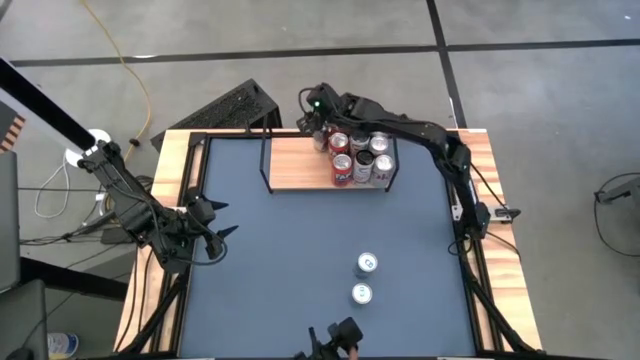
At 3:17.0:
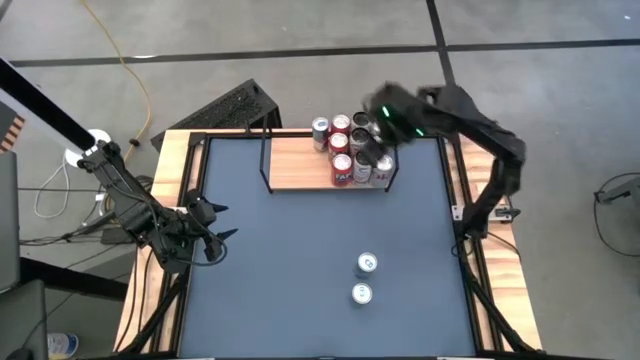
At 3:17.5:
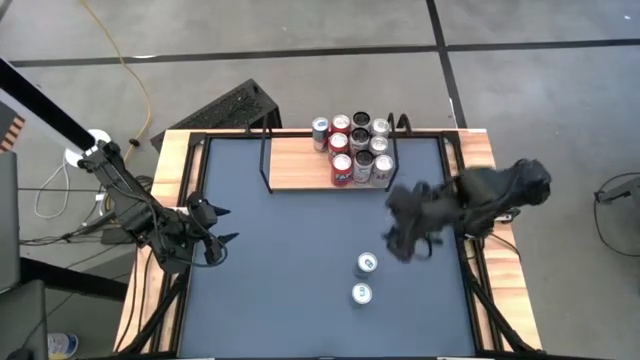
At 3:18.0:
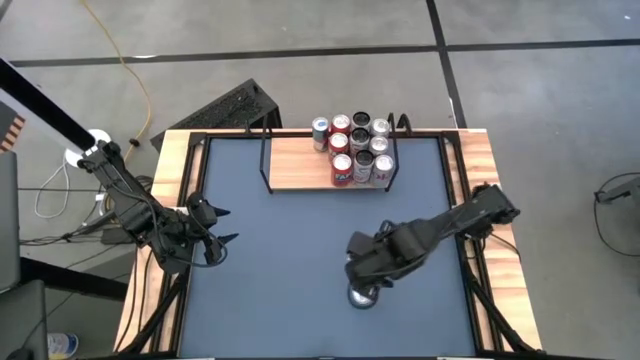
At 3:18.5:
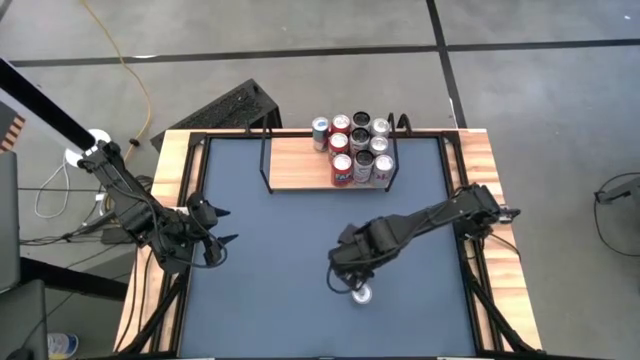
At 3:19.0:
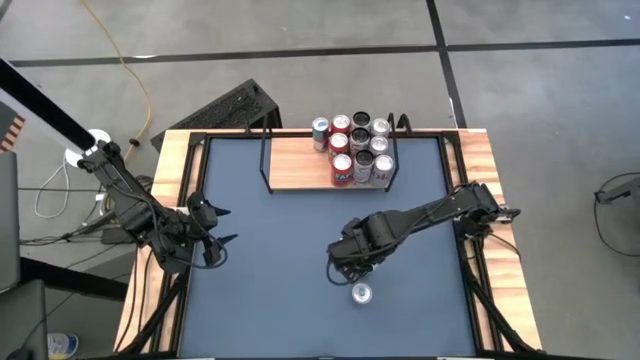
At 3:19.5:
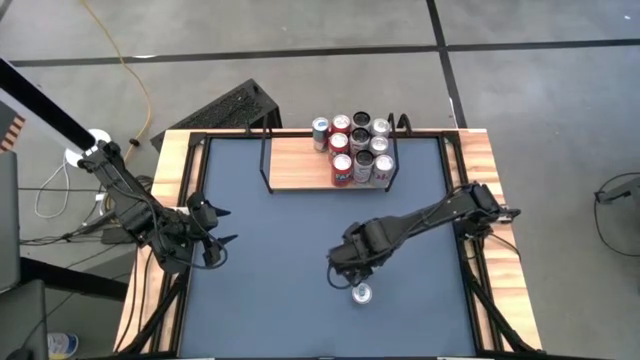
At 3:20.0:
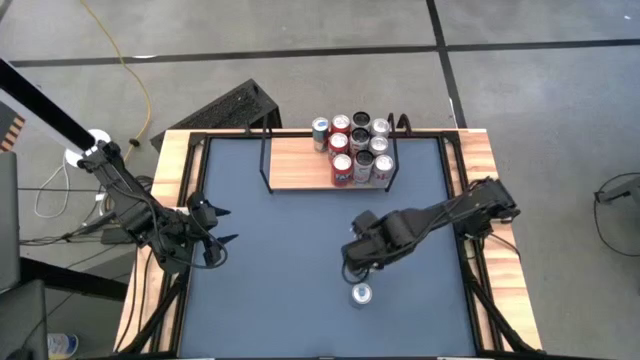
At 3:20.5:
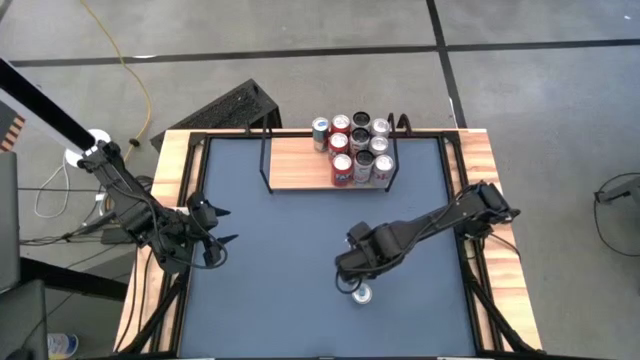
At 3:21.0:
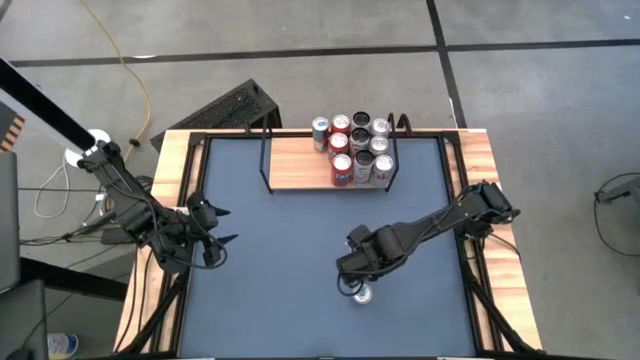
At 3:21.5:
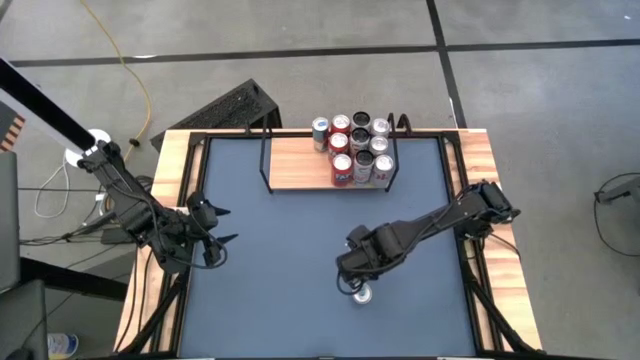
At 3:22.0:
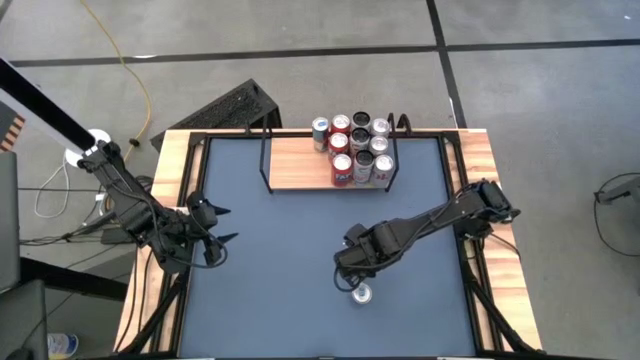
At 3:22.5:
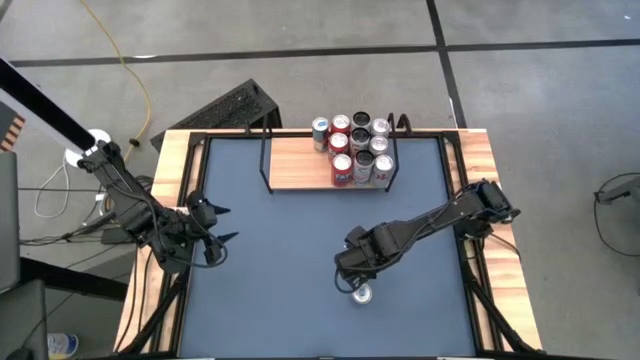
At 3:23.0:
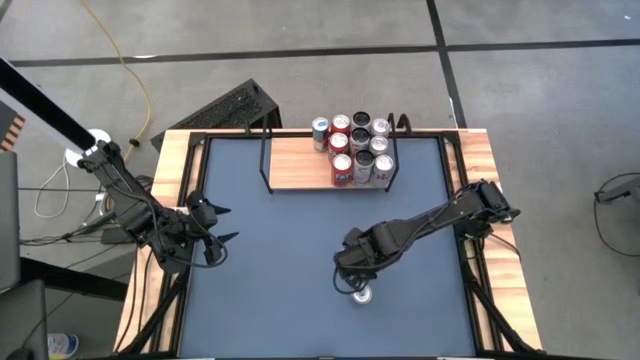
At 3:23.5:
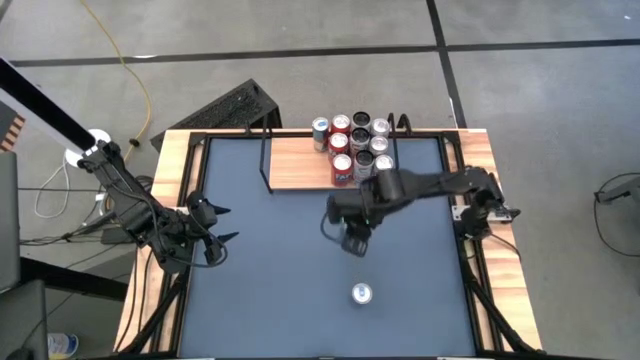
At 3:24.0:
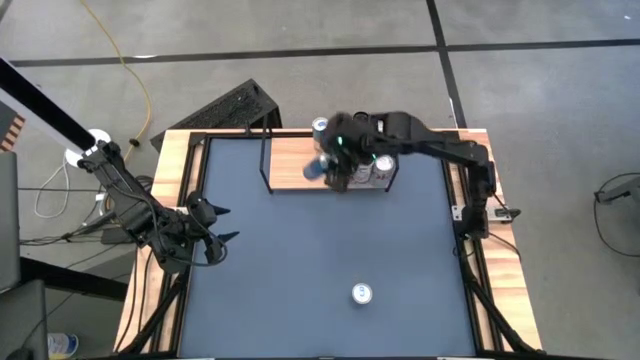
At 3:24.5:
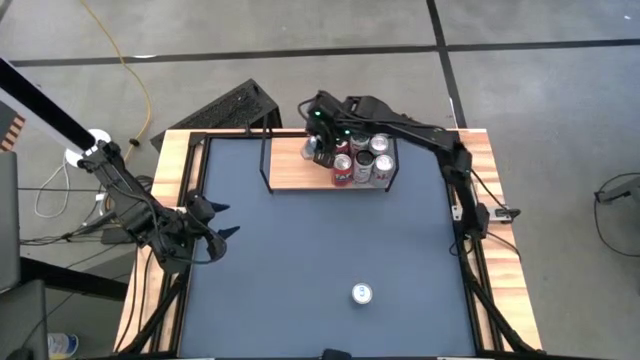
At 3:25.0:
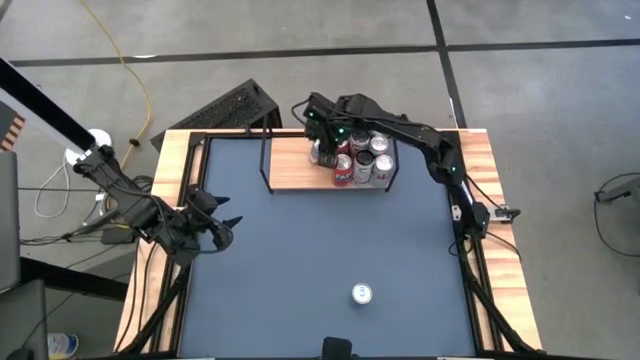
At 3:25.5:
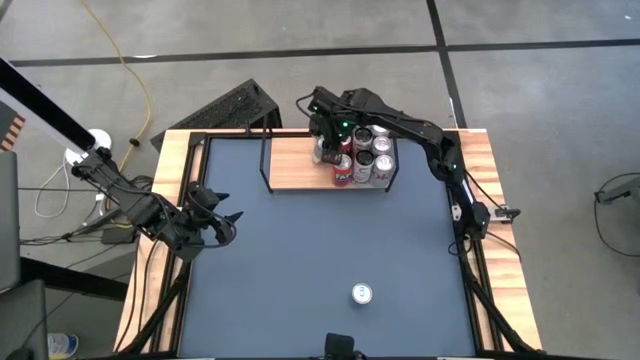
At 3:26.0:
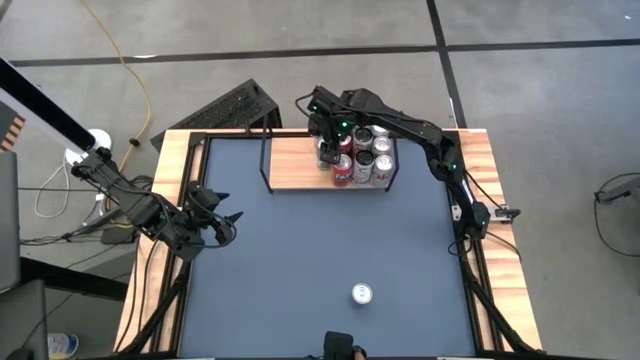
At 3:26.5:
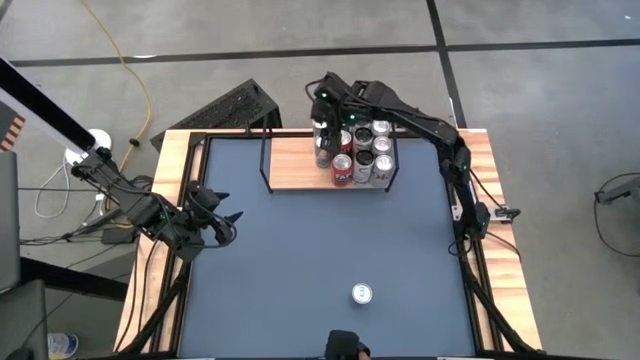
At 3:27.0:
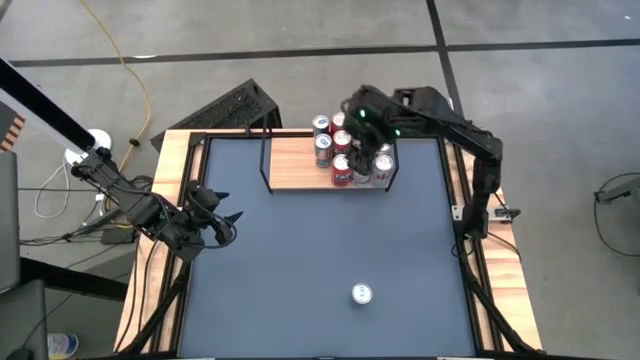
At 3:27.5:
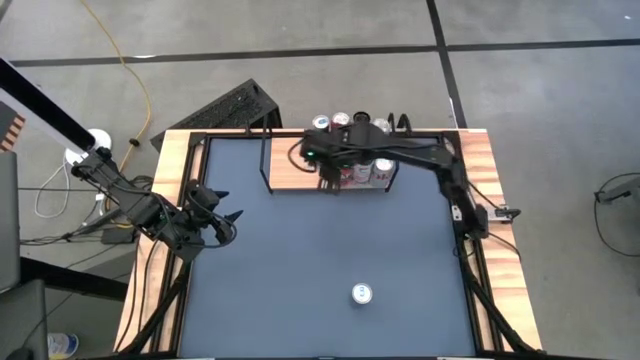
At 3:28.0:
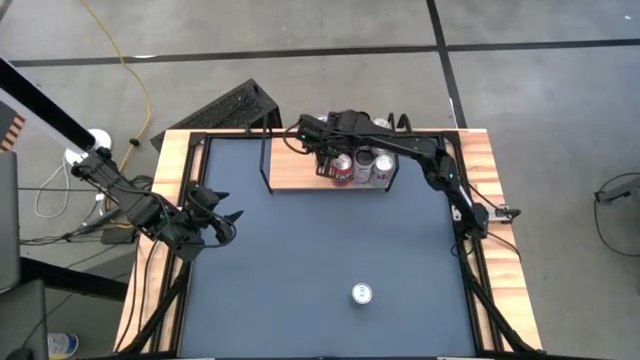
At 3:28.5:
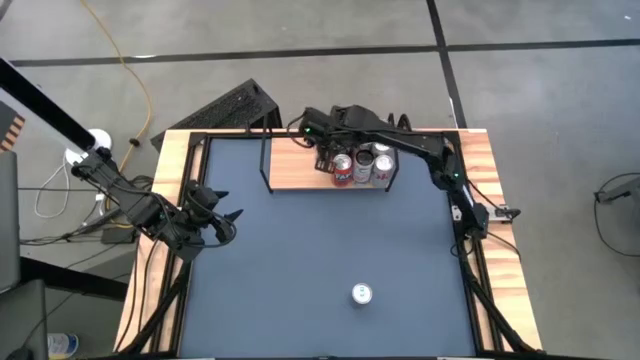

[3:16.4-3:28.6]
Task: Place canned beverage on shelf
Put the top blue soda can on the shelf aligned with the other blue soda can

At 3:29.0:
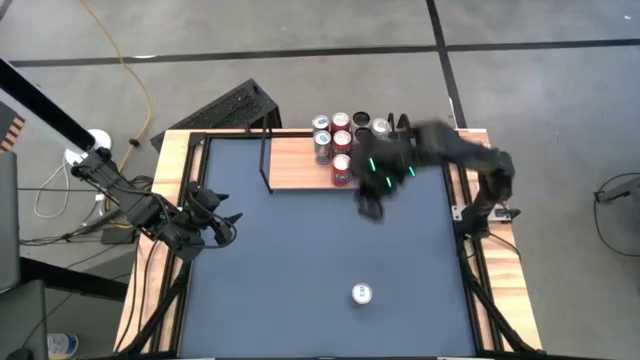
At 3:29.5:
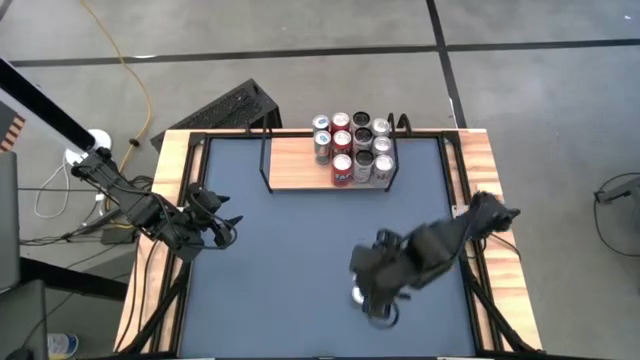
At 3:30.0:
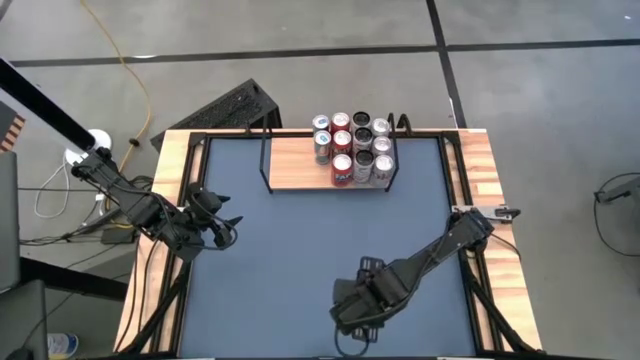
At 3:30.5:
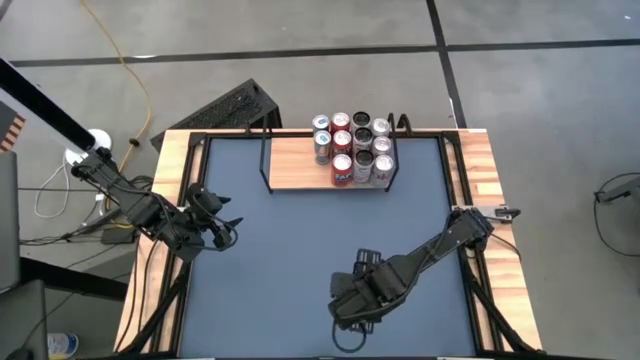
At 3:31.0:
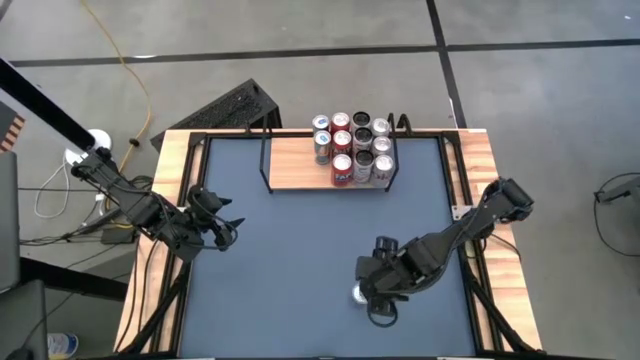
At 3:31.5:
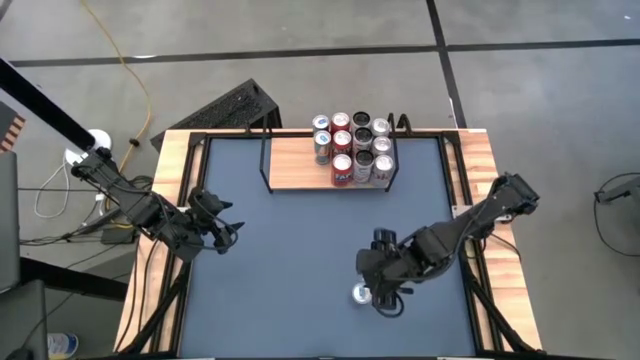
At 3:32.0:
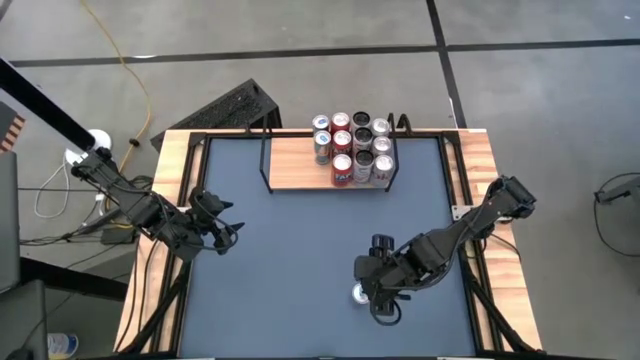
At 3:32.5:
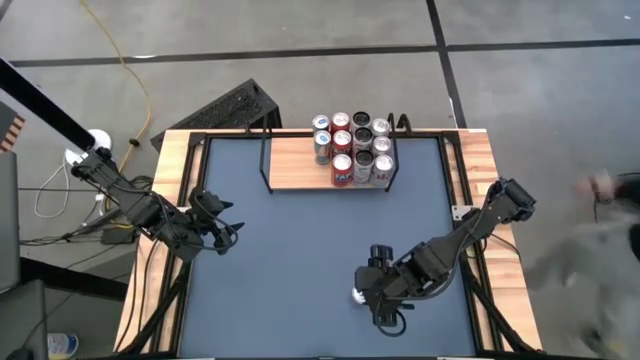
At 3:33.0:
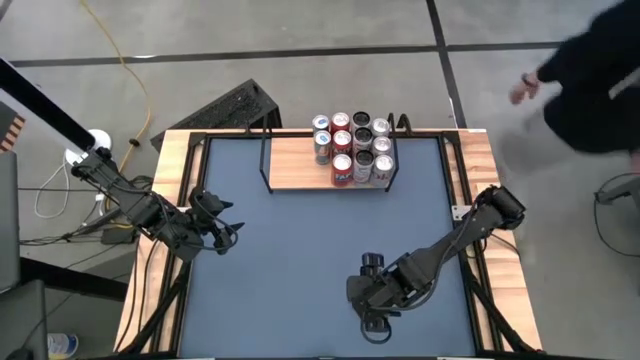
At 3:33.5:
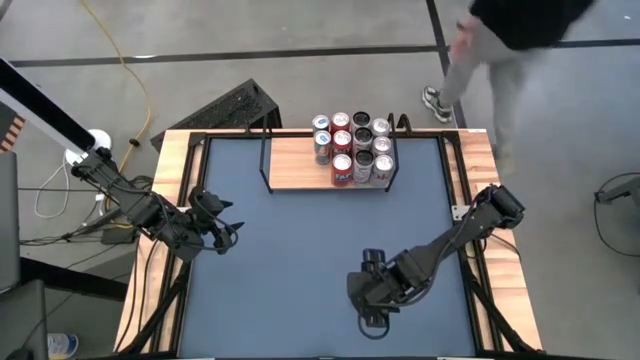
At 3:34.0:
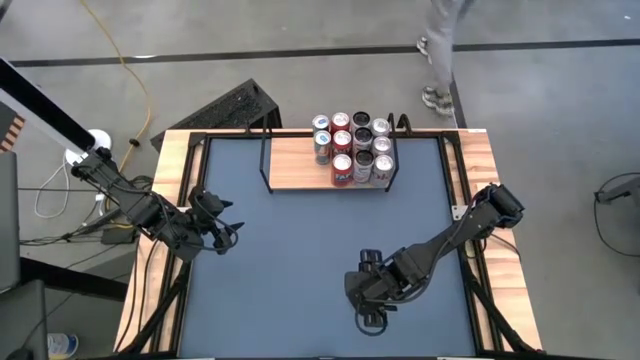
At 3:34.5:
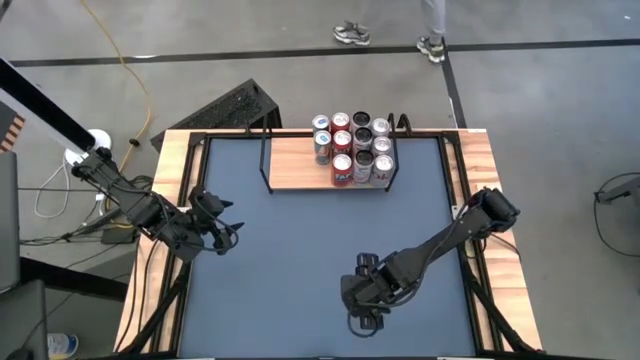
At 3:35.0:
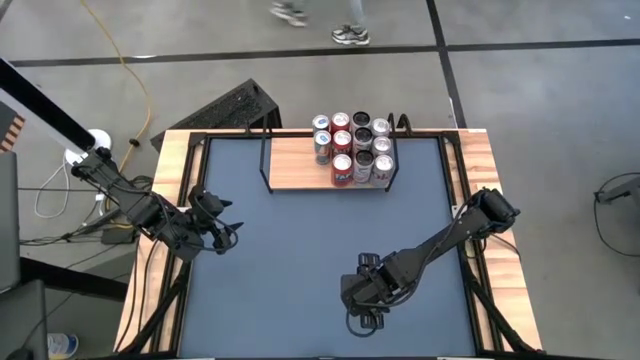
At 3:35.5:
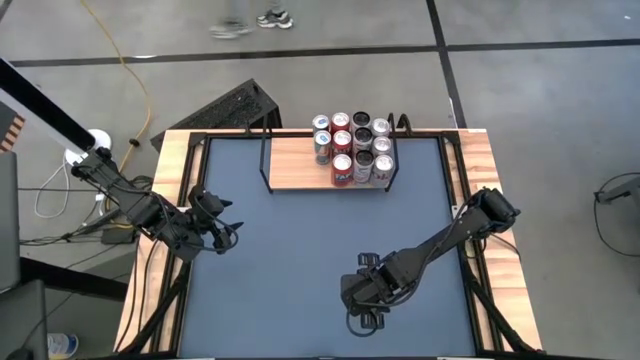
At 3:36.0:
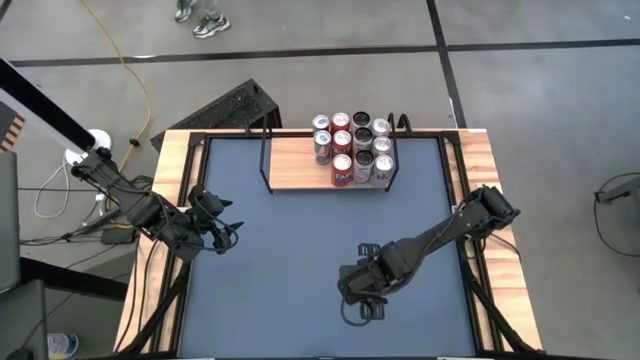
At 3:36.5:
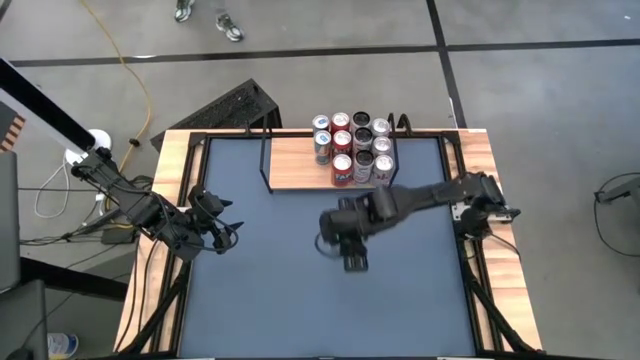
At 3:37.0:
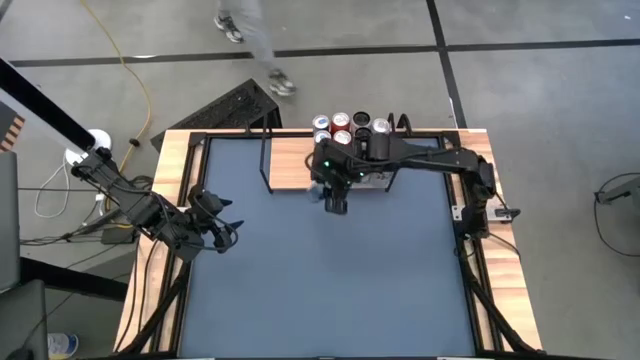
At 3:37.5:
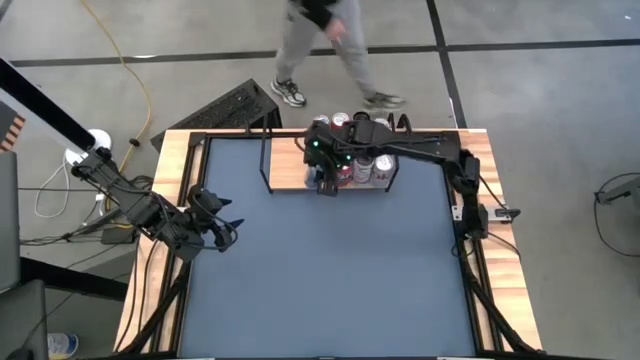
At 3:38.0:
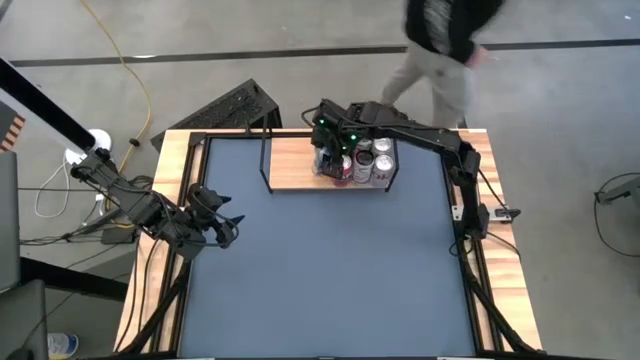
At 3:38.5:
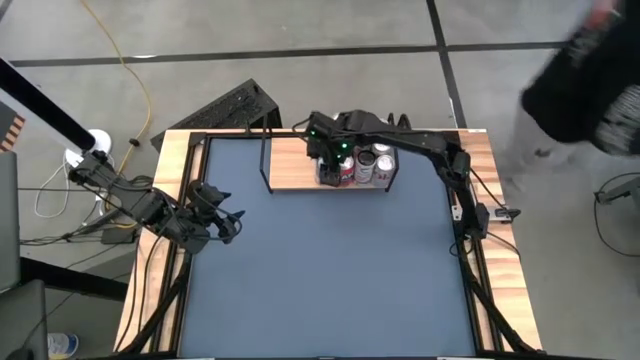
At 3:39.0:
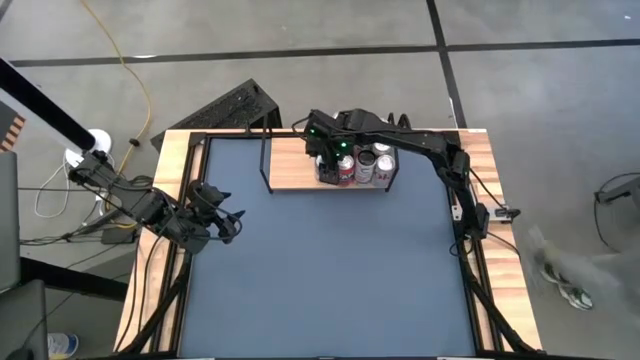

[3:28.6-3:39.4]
Put the blue soda can on the shelf aligned with the other blue soda cans
